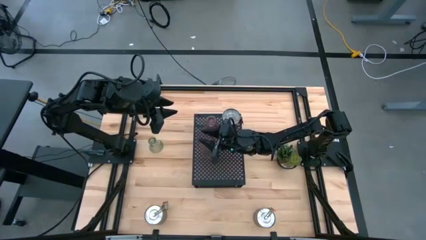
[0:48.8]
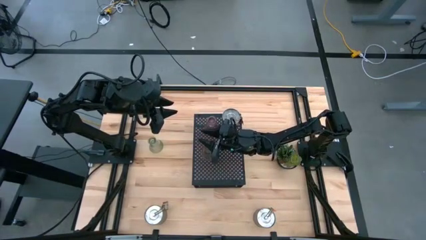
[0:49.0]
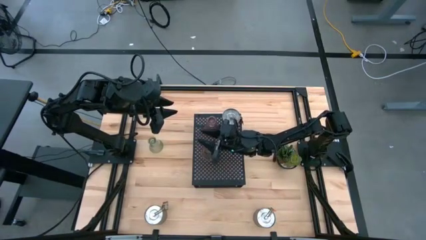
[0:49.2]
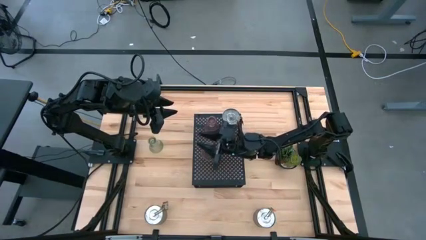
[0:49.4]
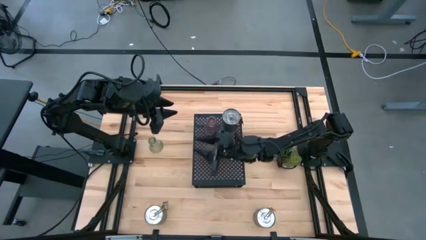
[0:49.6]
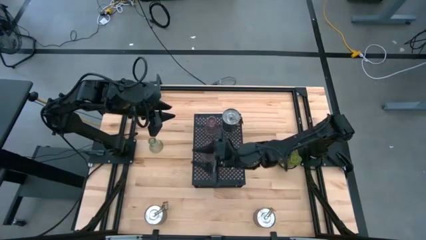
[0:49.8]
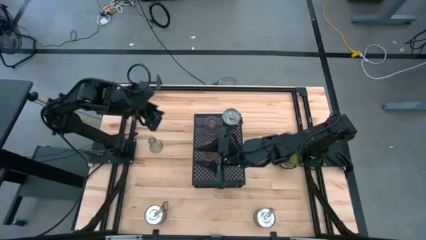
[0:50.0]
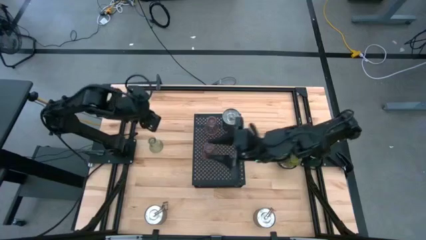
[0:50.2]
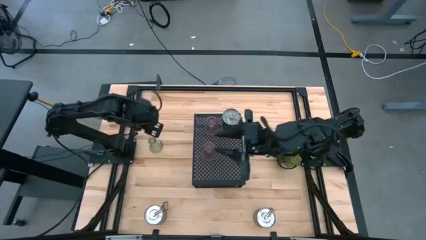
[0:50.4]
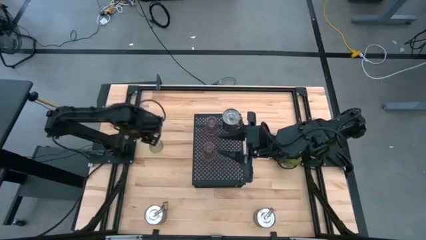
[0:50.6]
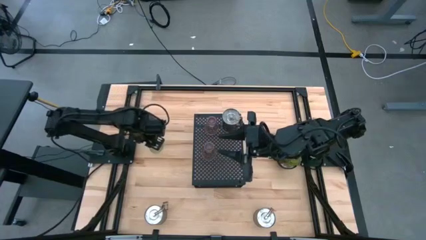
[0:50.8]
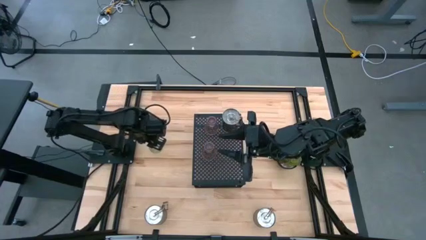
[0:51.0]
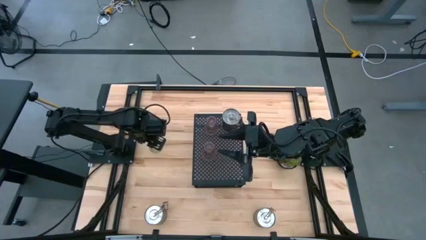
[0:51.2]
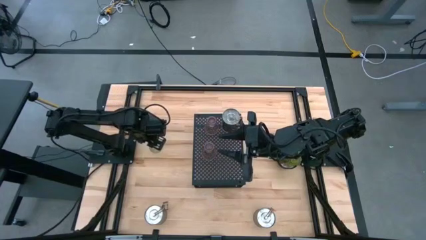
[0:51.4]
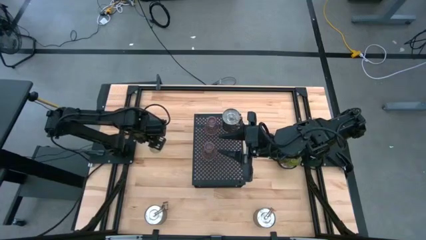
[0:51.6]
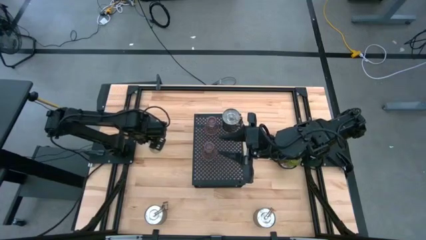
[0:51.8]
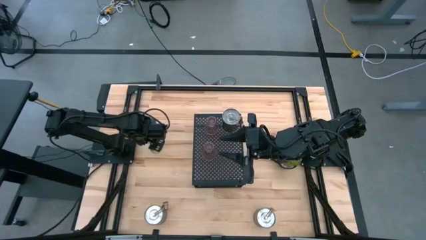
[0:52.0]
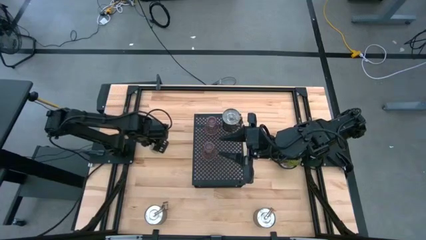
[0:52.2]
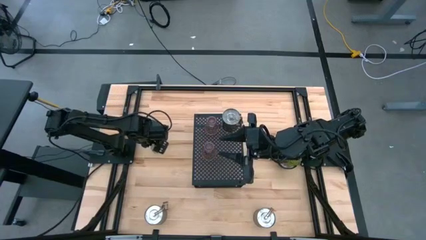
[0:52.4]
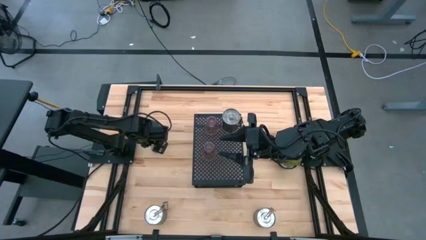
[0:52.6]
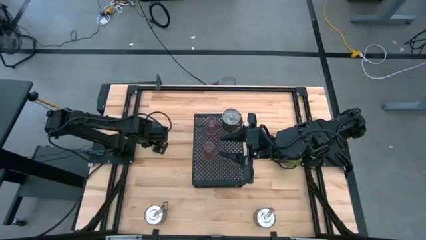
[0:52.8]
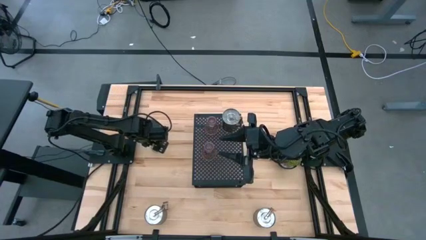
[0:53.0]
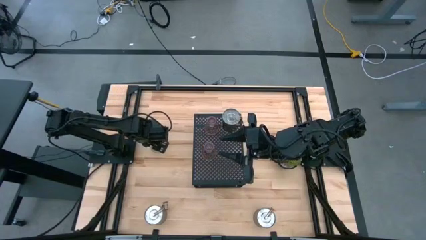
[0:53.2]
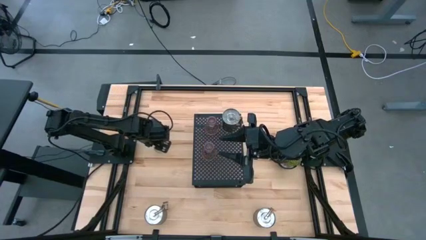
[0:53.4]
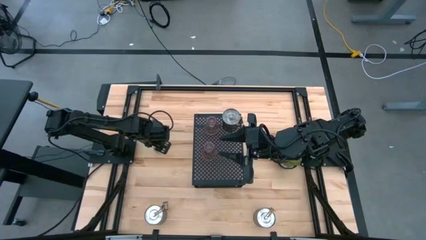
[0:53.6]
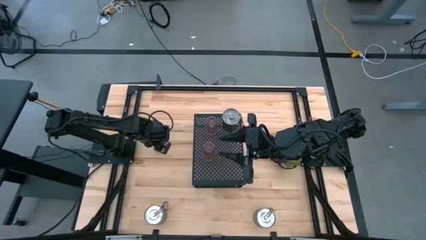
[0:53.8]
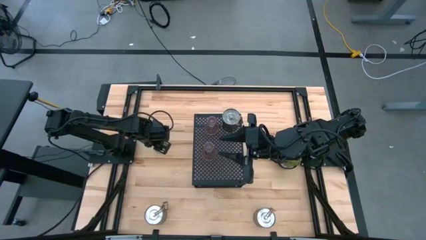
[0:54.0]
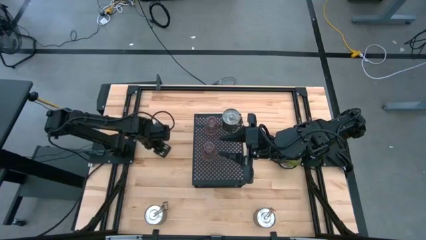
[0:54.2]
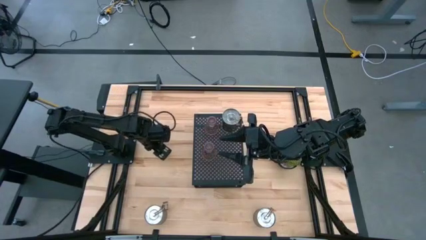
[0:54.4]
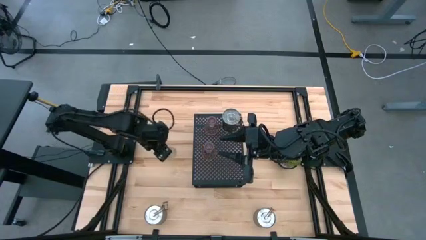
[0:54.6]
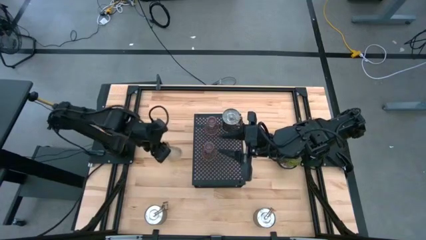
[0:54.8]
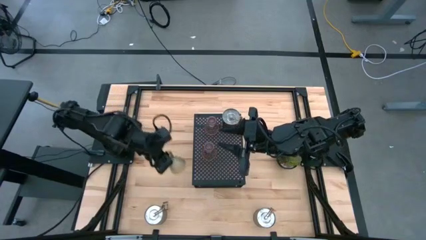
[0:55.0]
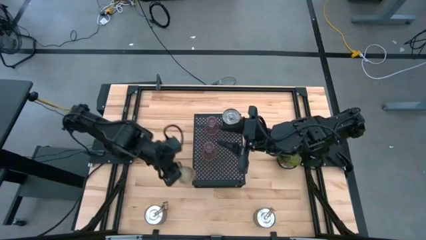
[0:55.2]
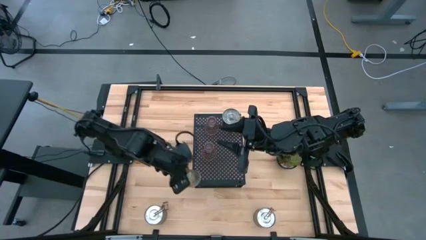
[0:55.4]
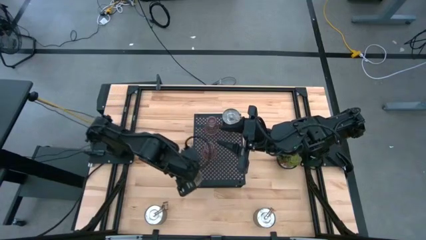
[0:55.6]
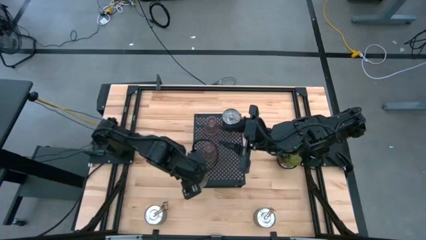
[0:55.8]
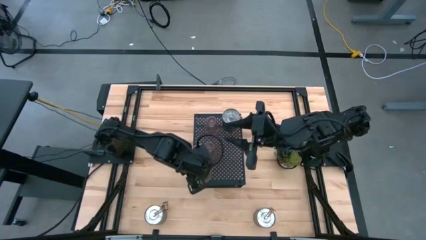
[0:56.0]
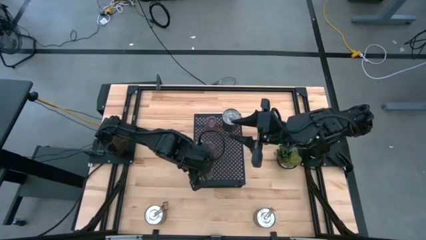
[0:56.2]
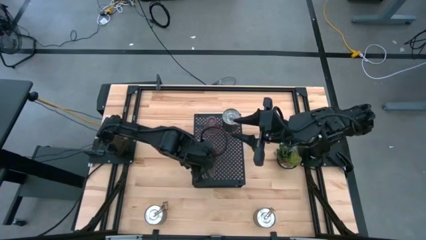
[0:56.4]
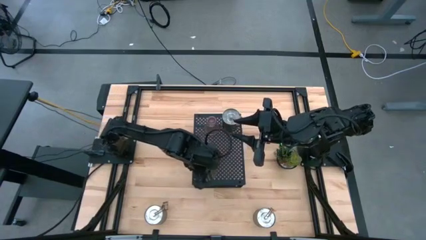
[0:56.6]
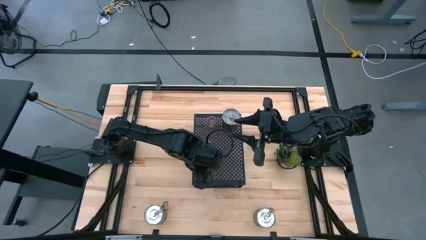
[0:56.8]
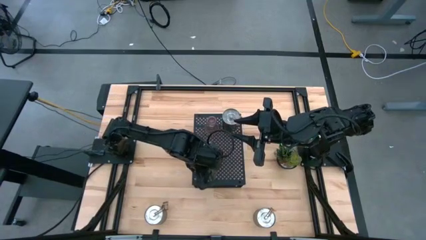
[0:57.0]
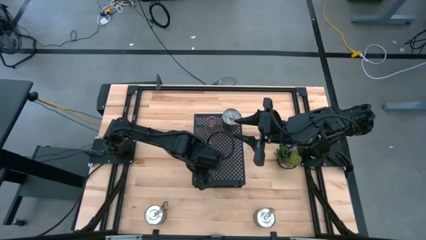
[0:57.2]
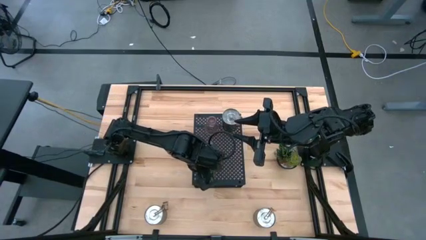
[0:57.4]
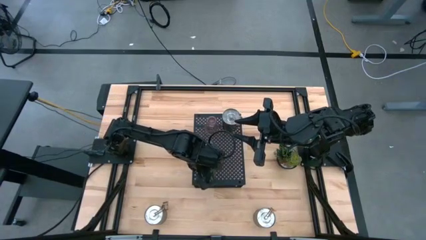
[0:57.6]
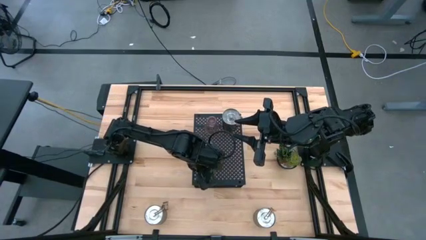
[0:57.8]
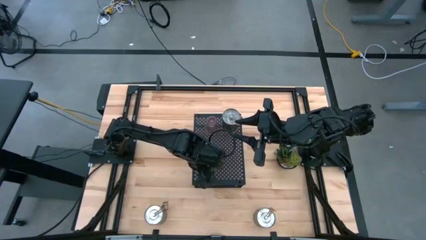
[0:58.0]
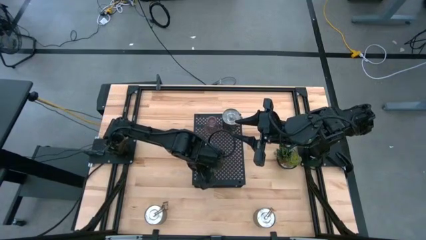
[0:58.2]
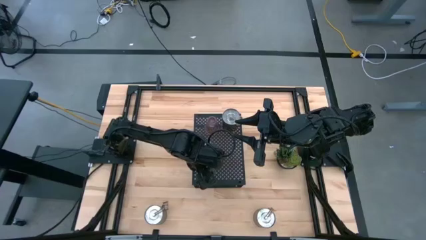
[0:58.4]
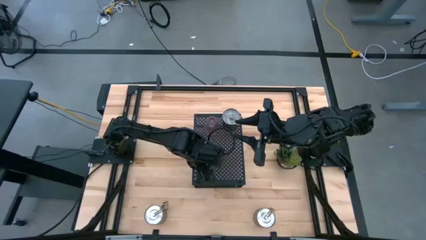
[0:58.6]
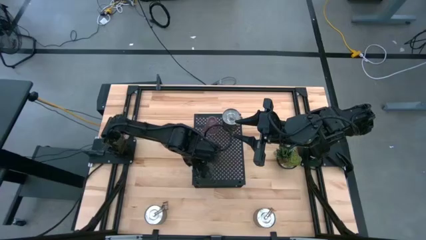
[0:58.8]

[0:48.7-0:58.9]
Task: Pick & Place candle stick holders
Put the green candle holder on the shelf

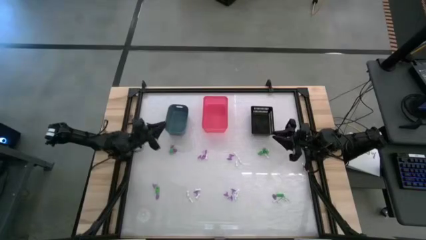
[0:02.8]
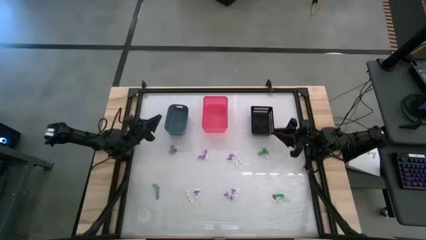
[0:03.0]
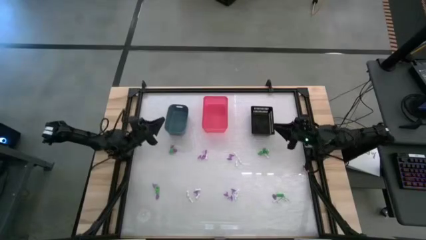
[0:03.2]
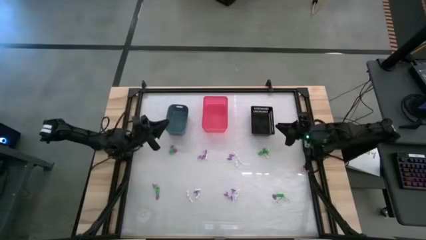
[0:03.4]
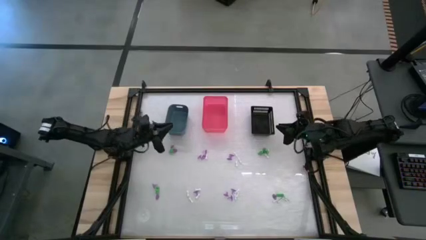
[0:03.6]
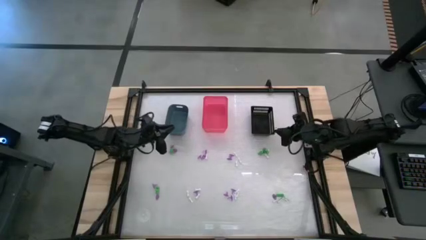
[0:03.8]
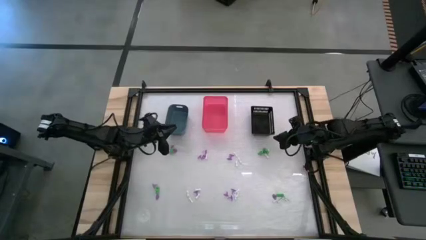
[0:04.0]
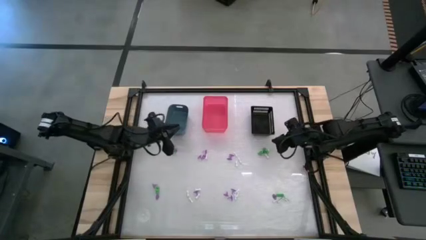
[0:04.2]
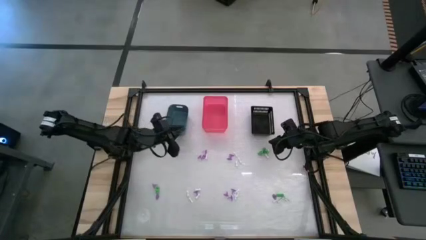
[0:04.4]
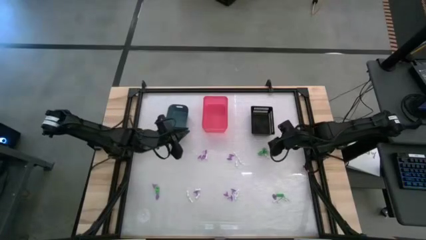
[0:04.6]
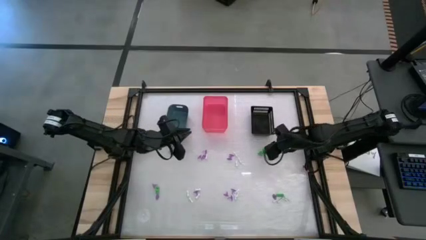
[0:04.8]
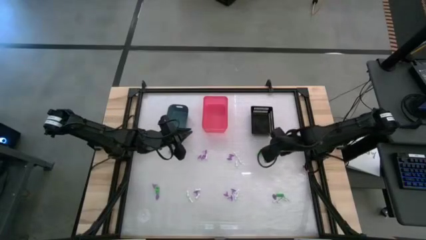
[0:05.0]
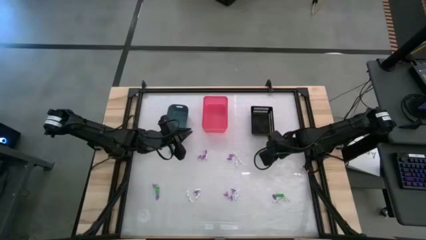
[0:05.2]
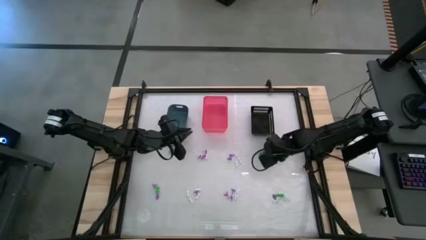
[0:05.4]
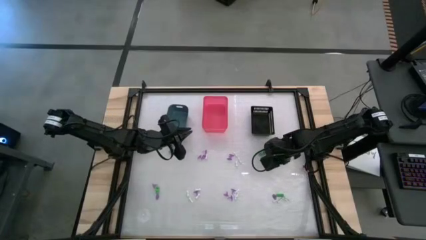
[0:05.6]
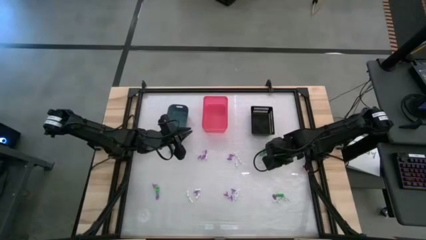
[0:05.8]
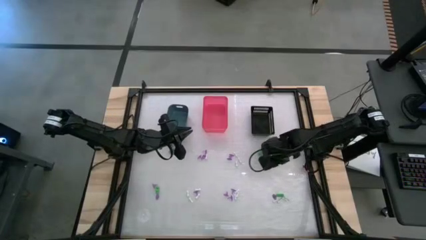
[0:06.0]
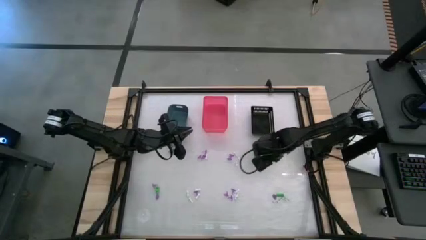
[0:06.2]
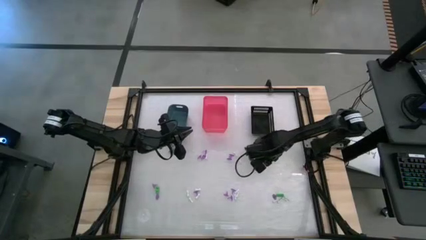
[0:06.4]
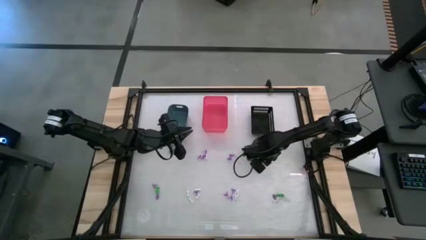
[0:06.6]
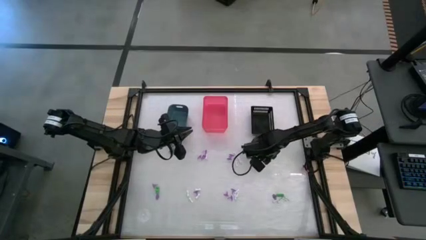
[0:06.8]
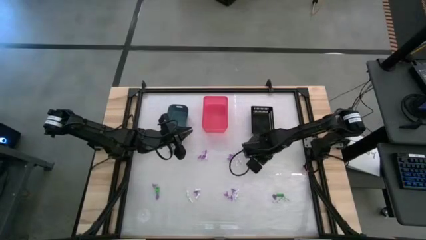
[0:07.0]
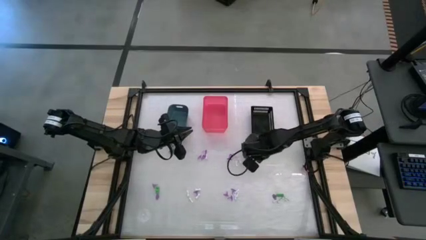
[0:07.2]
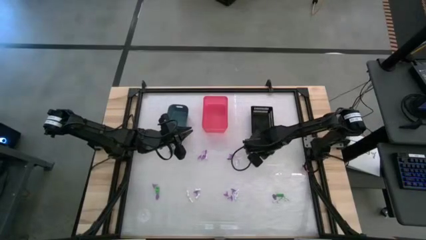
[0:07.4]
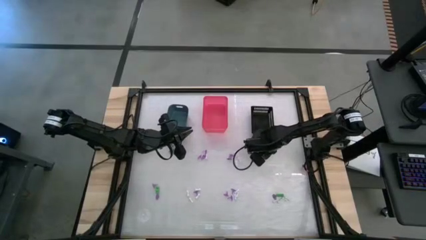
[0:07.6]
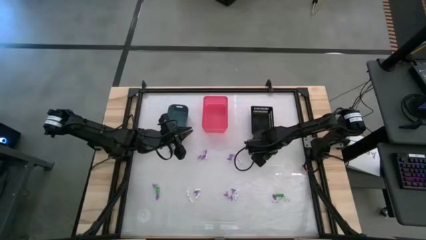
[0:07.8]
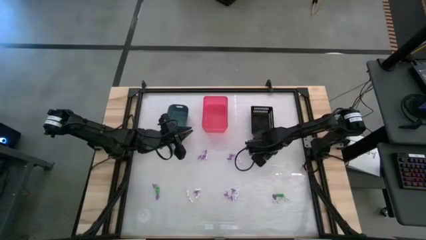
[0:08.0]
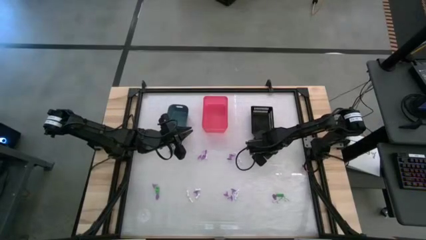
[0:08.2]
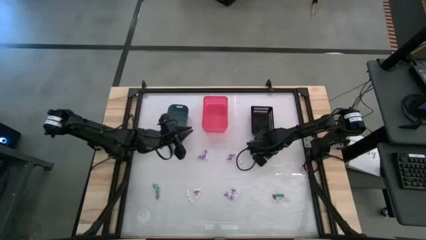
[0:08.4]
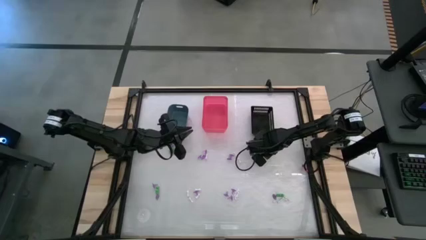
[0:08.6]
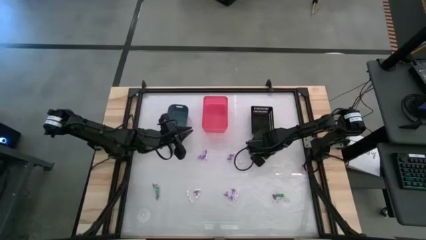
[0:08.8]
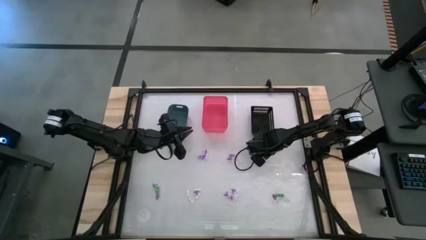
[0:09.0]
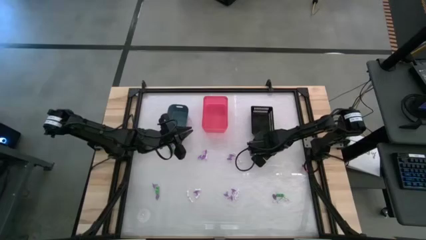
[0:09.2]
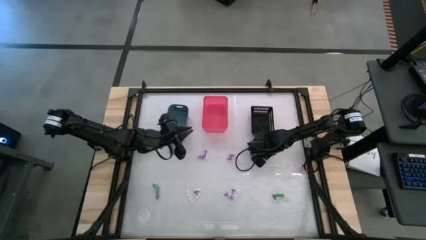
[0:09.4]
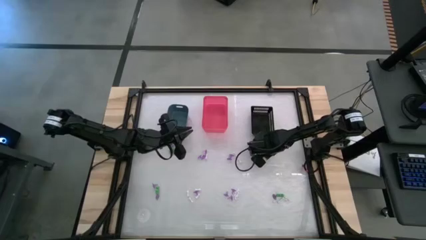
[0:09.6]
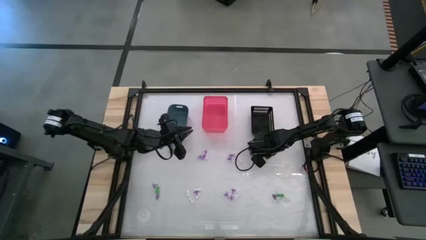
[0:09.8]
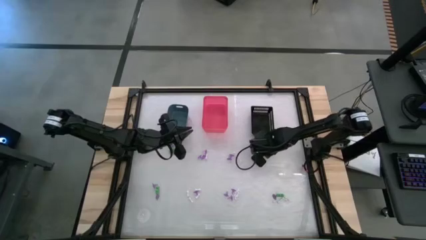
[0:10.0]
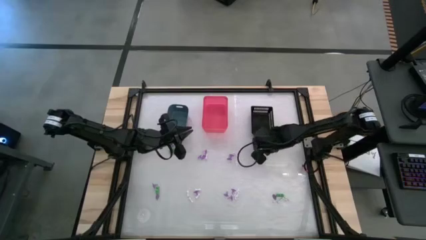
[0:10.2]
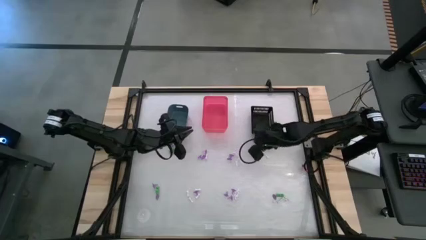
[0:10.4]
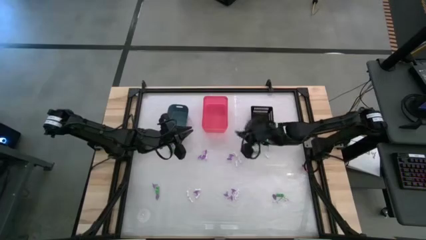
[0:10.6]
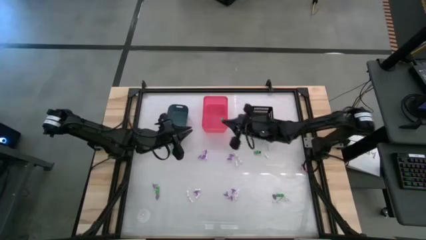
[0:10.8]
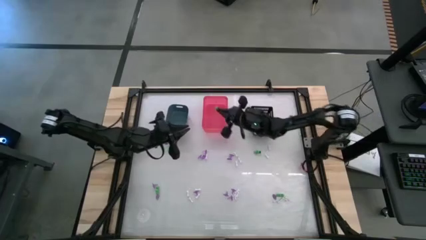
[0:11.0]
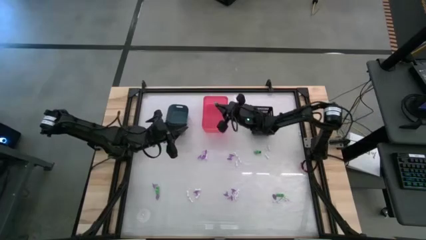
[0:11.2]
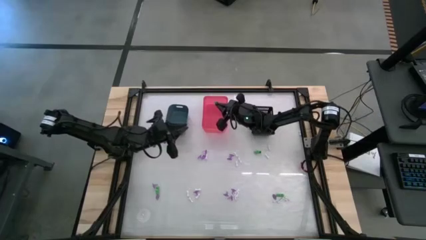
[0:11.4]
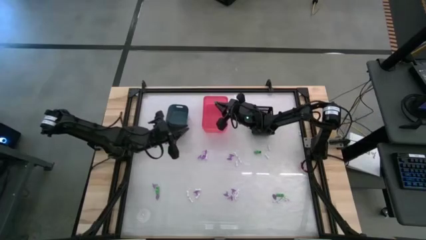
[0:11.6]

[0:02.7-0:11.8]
Task: Sort Halloween decoration
Put the green skeleton toy into the pink bin
